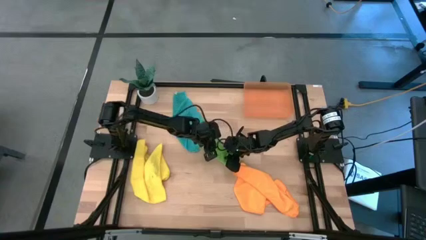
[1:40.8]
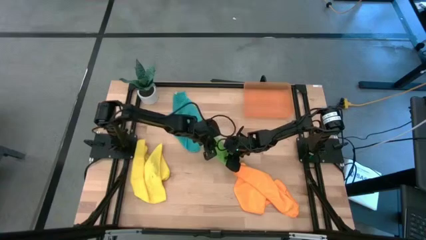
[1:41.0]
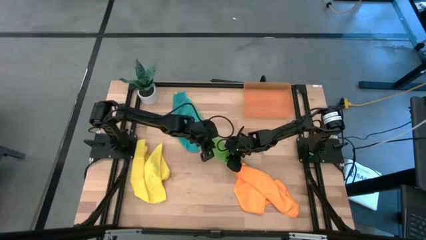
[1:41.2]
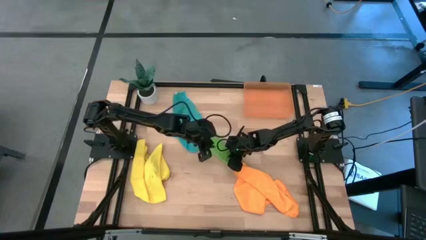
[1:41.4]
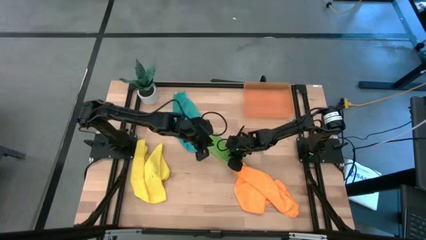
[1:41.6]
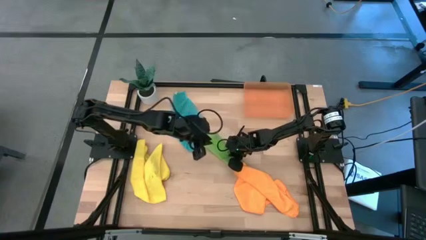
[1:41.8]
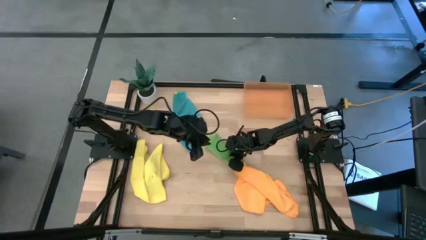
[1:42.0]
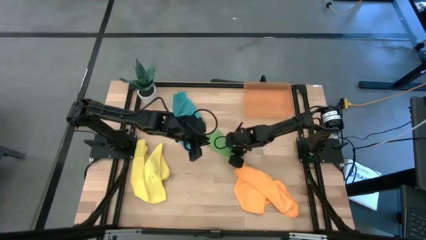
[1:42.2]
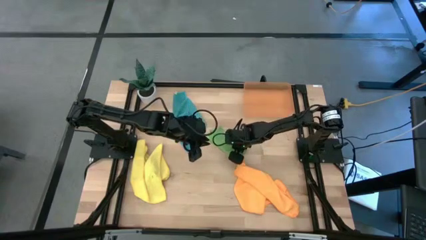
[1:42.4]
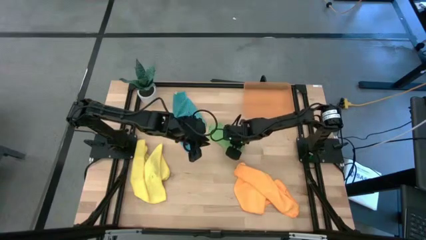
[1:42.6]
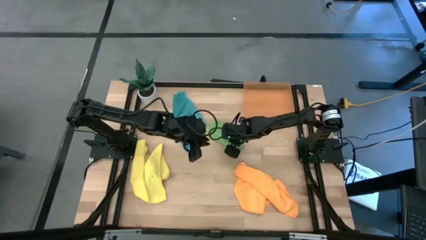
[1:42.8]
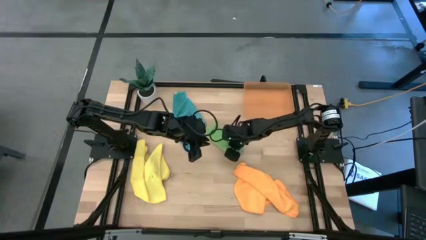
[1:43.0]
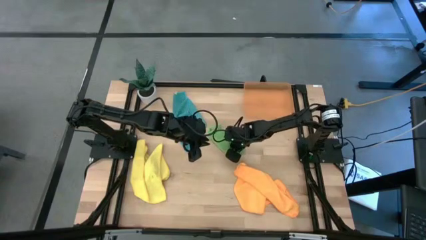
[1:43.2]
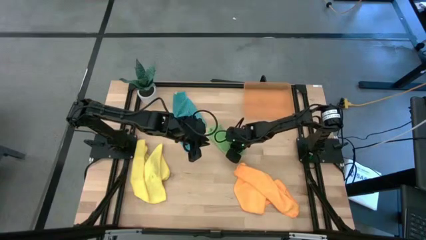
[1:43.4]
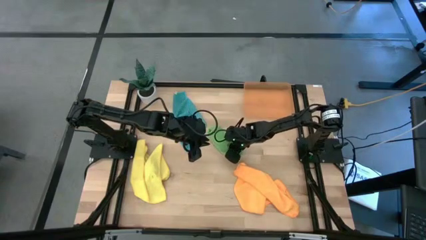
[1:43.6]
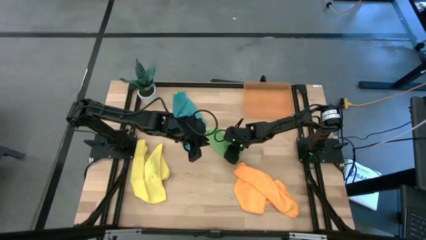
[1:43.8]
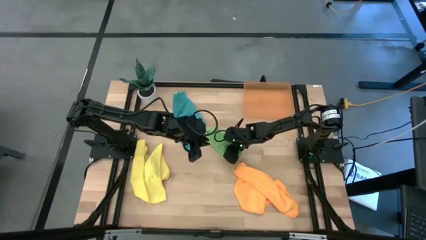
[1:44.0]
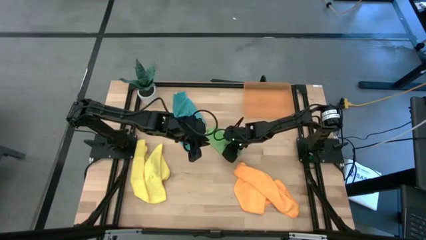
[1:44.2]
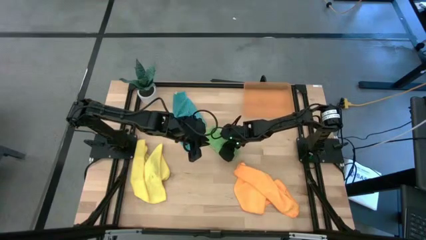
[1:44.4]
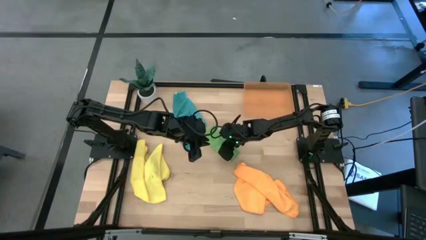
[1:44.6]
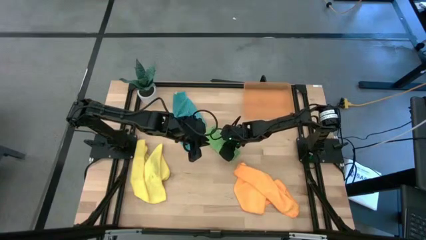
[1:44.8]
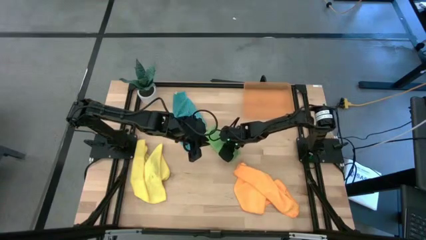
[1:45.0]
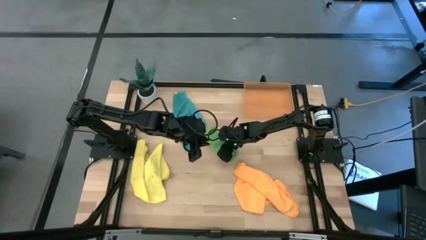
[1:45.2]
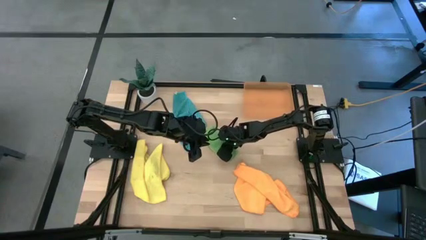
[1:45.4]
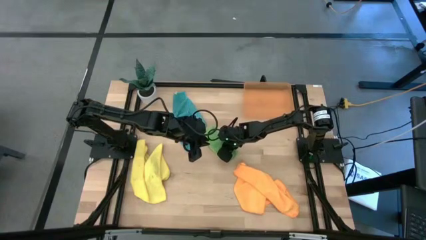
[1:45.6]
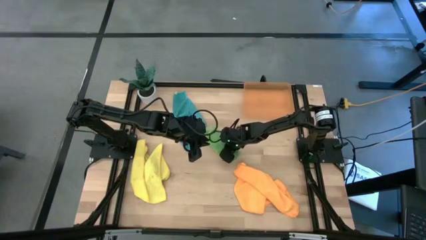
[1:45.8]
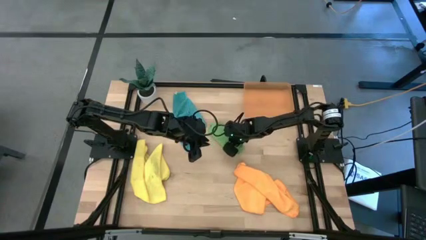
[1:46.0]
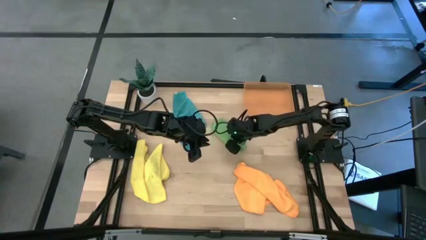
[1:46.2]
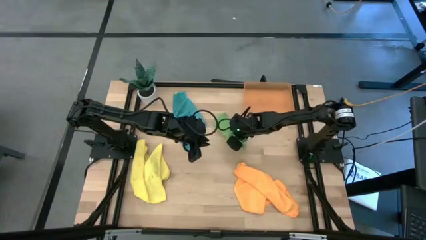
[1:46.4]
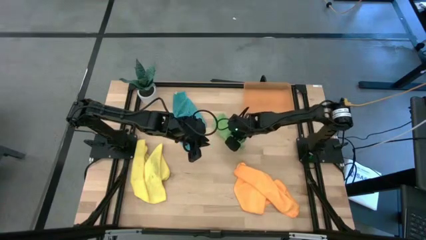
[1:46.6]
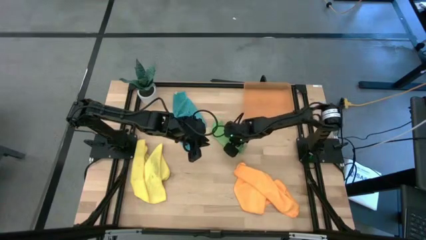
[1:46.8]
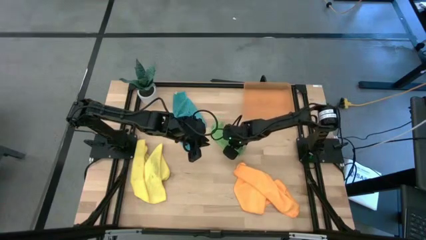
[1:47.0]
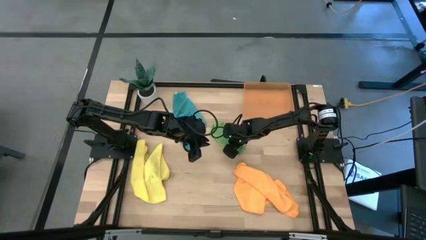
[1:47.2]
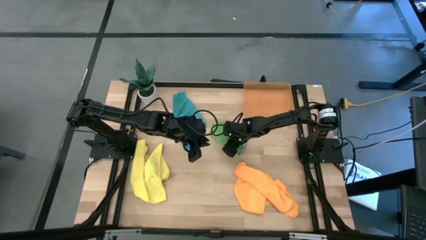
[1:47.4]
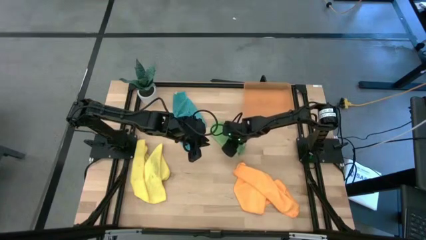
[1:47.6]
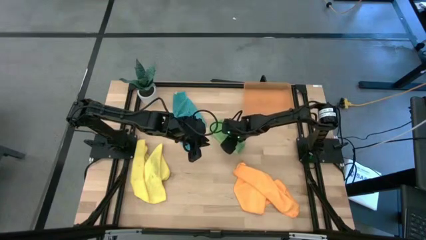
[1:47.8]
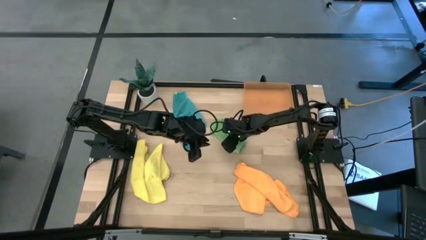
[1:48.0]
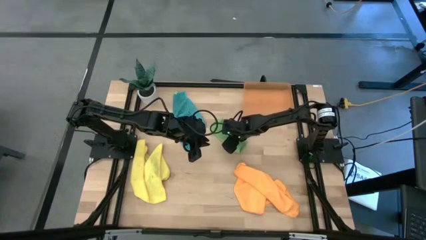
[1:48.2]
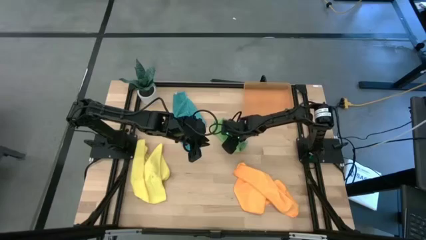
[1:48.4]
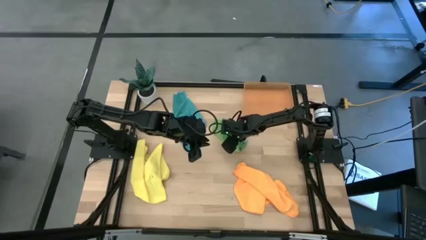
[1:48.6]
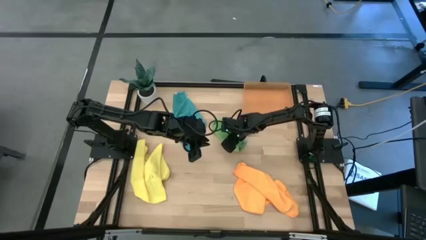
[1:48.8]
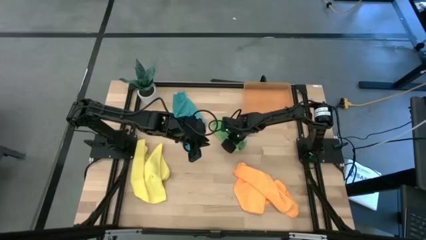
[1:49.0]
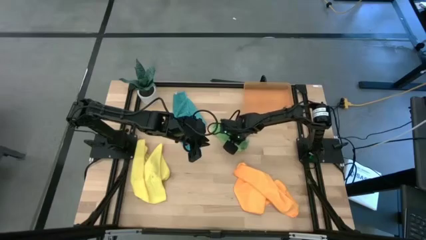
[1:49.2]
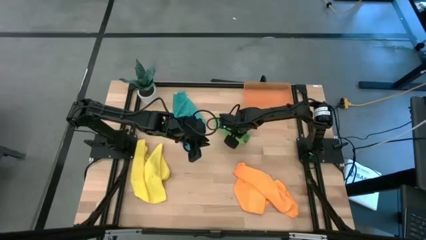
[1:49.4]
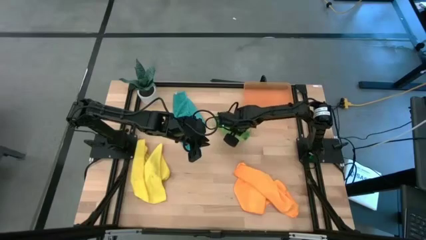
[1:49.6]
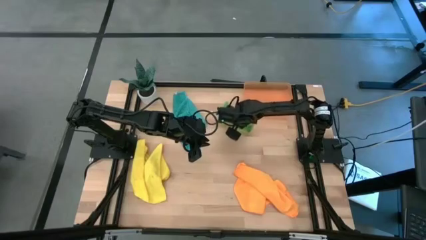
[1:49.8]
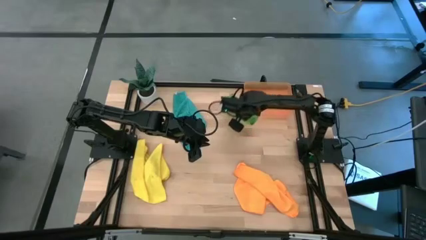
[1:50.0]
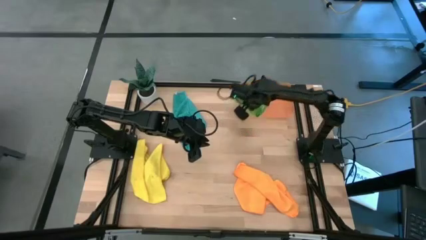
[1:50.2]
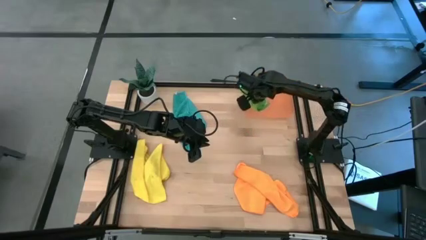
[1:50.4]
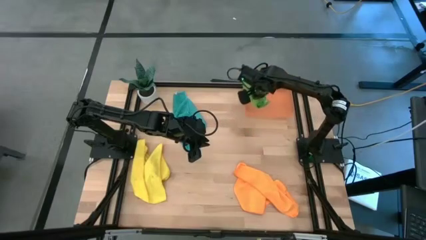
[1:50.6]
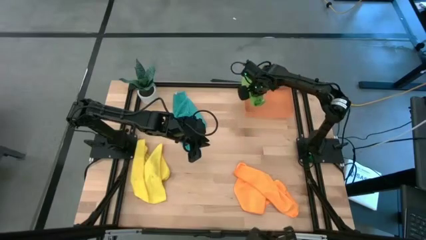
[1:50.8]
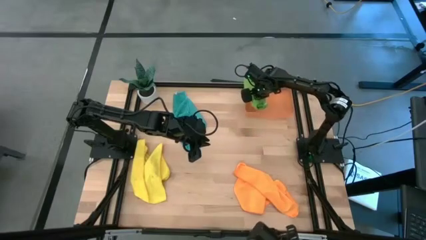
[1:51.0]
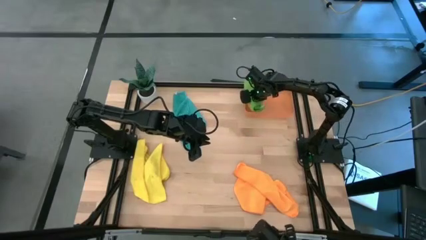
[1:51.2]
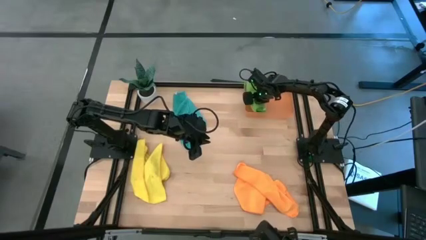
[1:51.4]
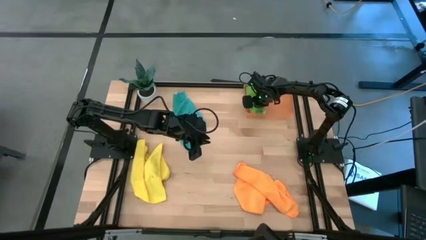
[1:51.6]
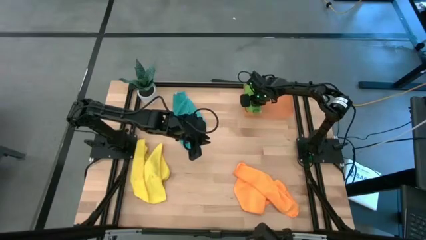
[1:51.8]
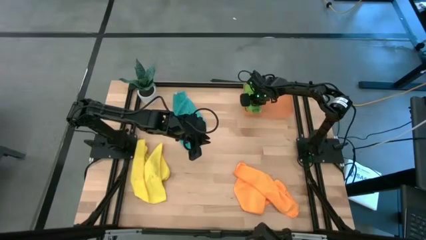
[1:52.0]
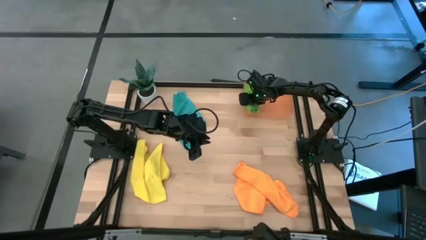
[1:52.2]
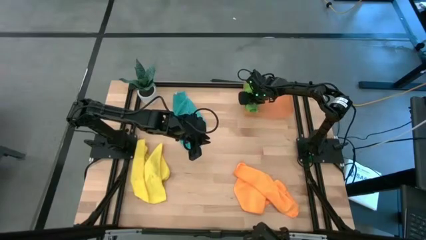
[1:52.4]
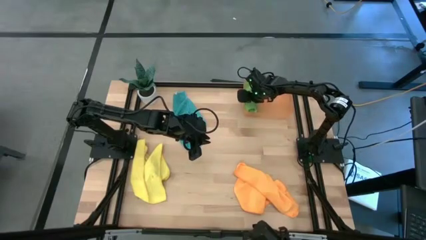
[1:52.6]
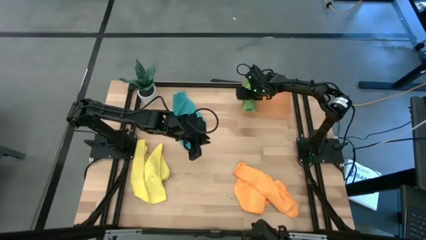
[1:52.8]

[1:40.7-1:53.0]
Task: Roll microfiber towels into tight, uniform cylinder then place into a basket
Put the green towel into the bin
